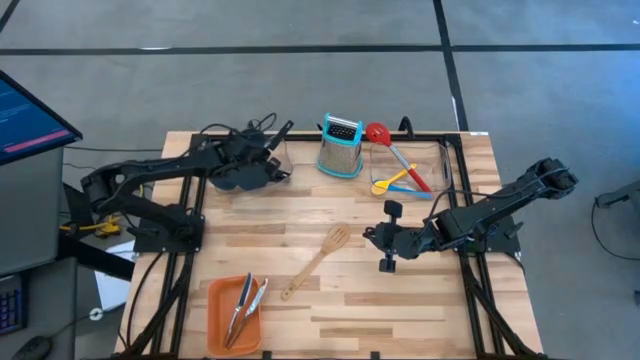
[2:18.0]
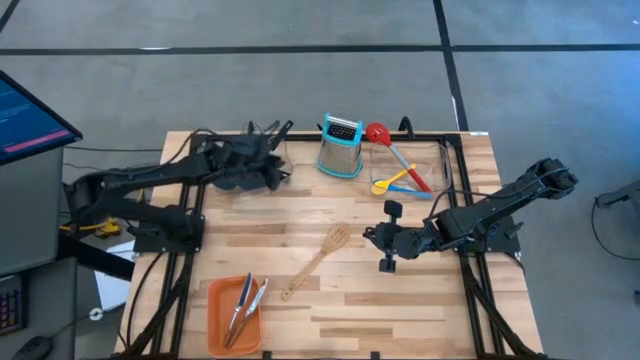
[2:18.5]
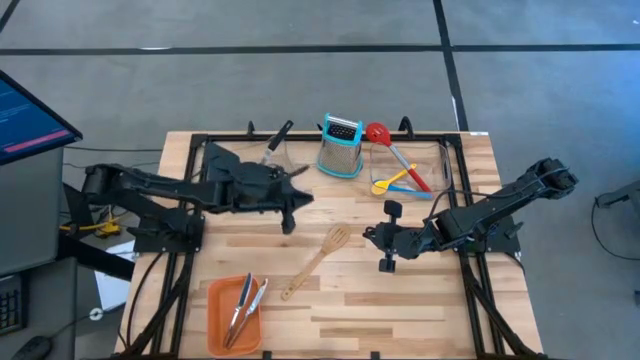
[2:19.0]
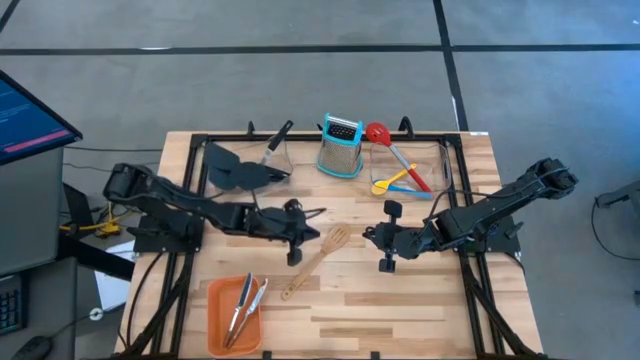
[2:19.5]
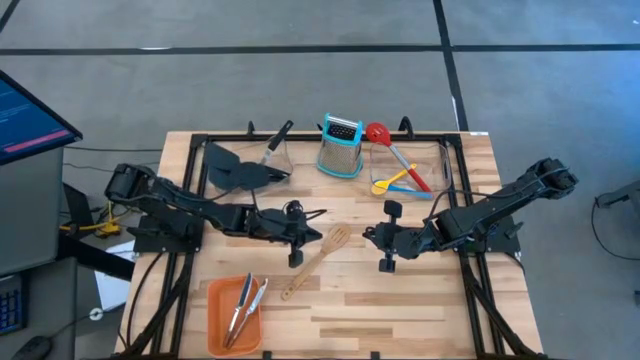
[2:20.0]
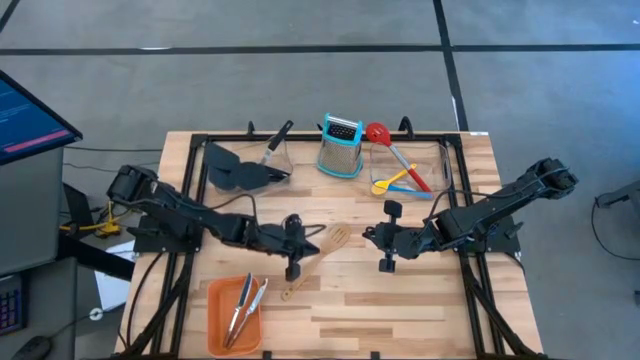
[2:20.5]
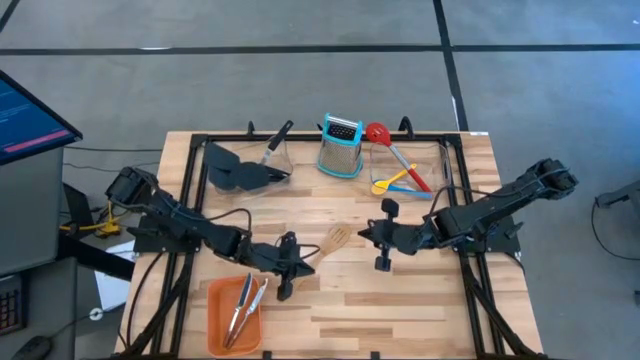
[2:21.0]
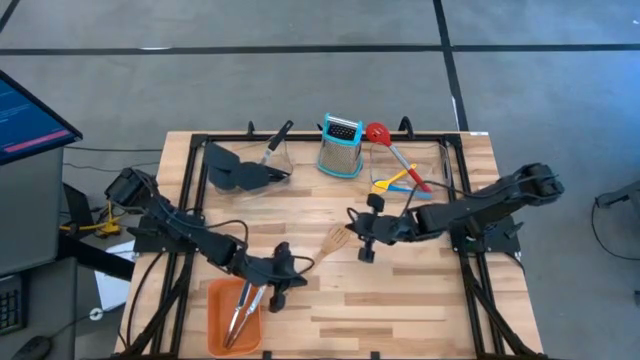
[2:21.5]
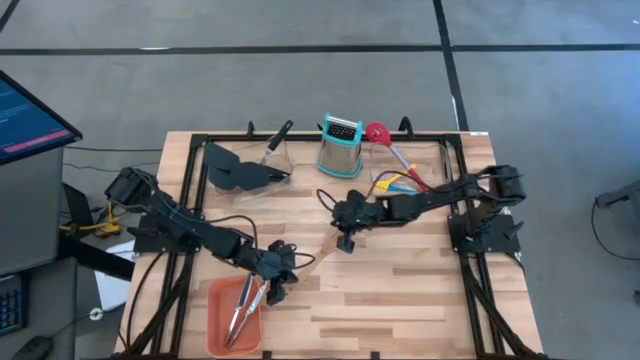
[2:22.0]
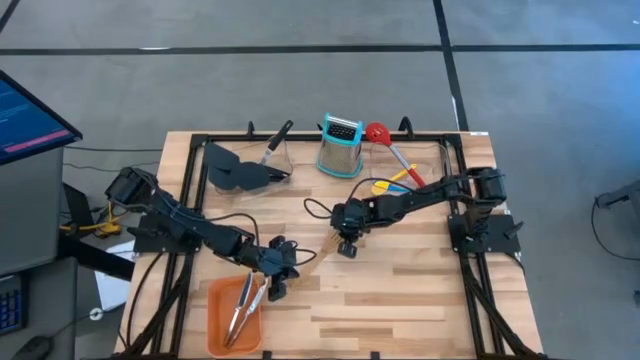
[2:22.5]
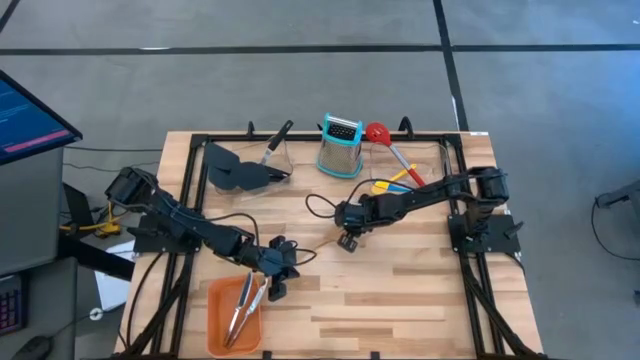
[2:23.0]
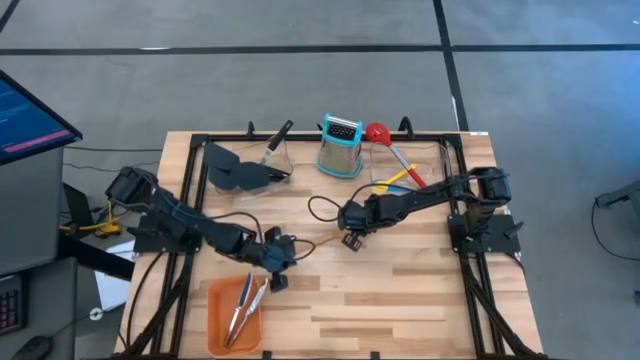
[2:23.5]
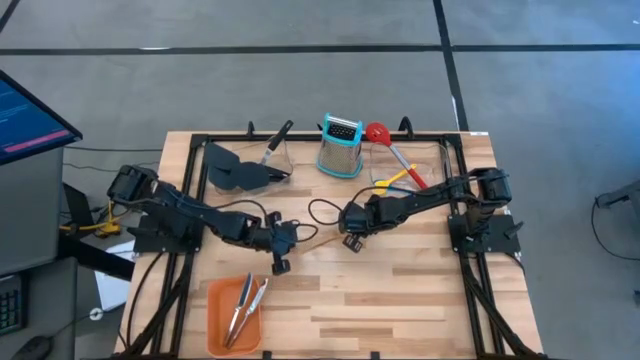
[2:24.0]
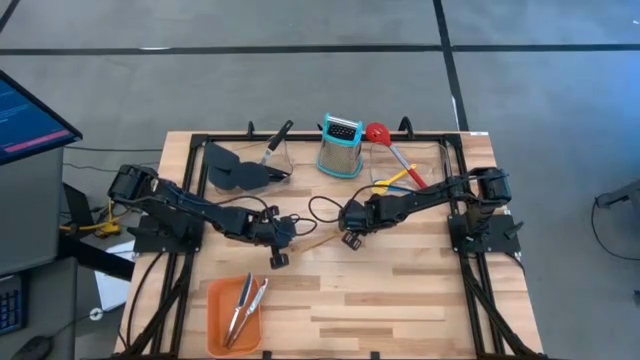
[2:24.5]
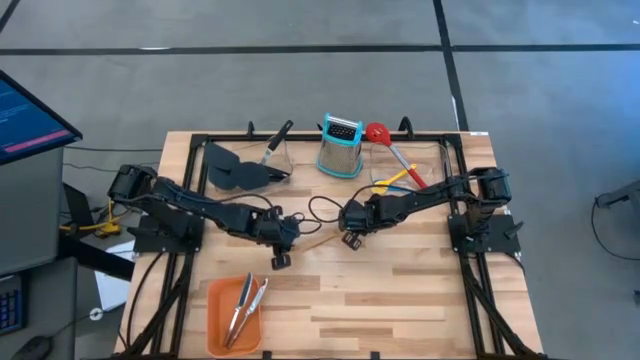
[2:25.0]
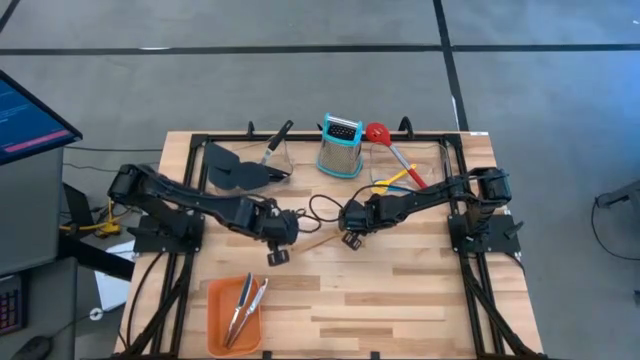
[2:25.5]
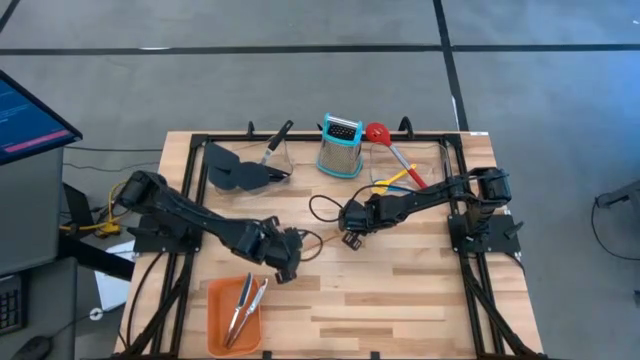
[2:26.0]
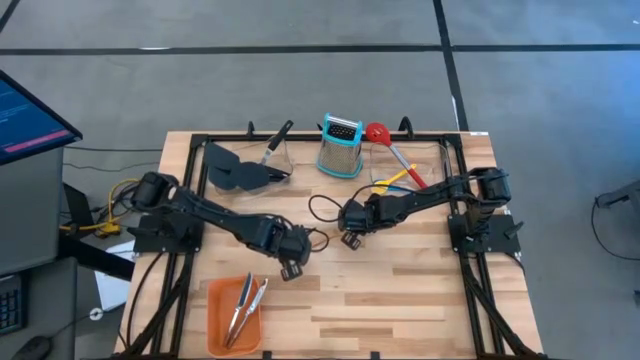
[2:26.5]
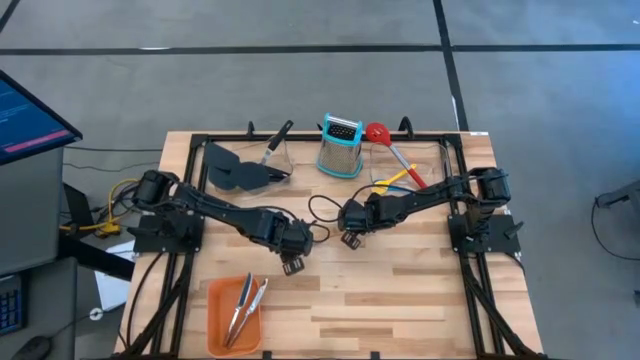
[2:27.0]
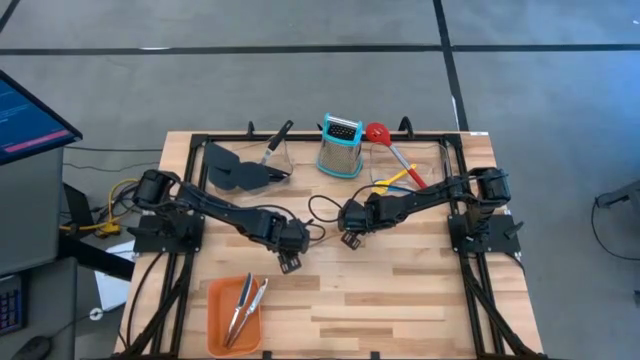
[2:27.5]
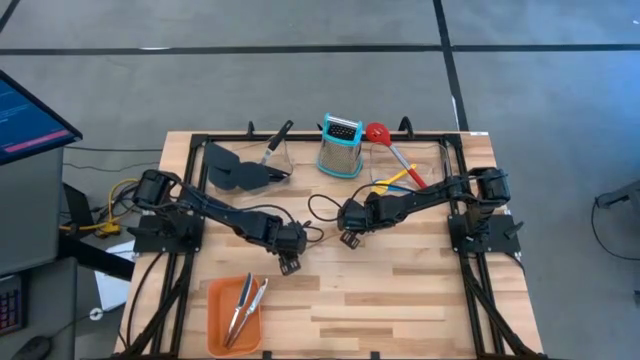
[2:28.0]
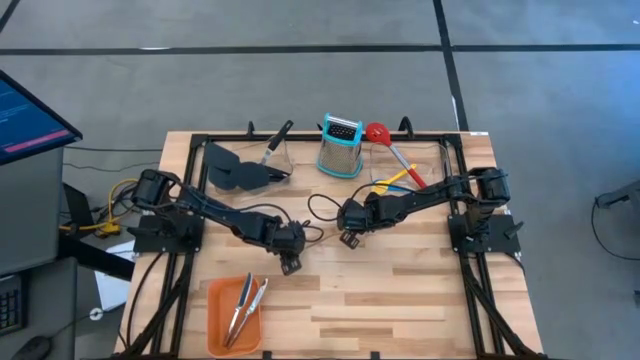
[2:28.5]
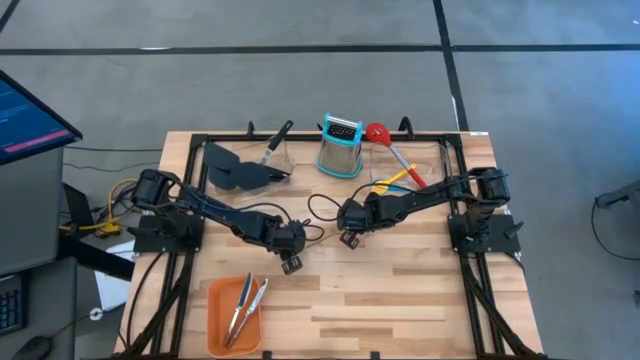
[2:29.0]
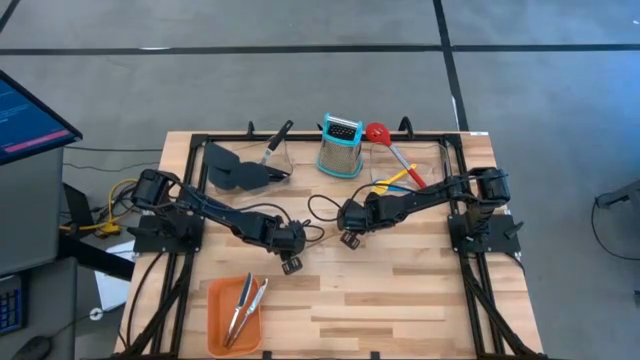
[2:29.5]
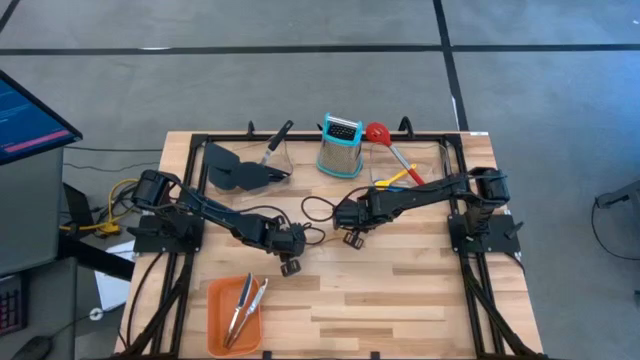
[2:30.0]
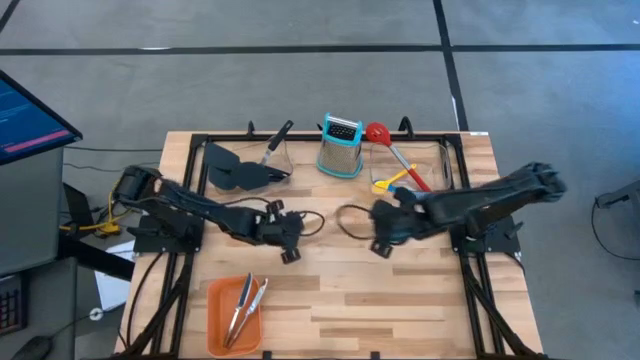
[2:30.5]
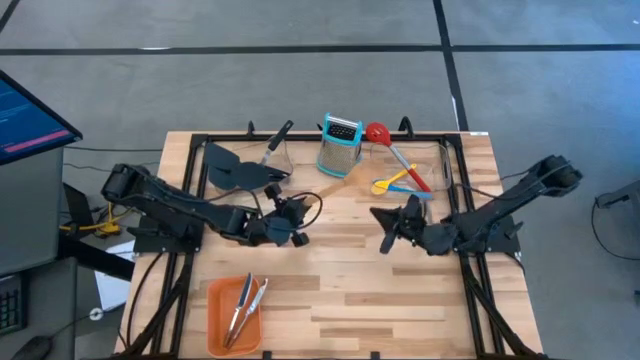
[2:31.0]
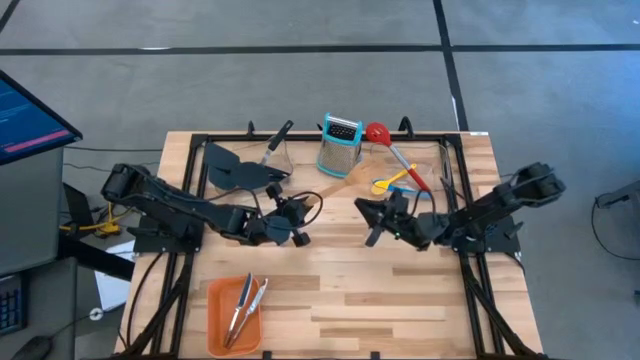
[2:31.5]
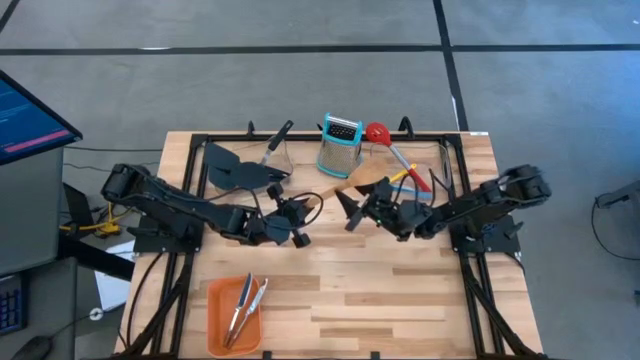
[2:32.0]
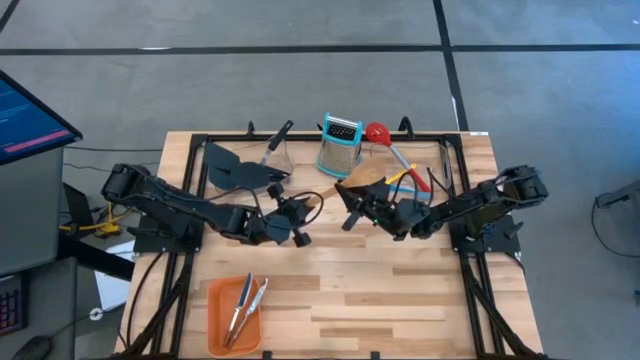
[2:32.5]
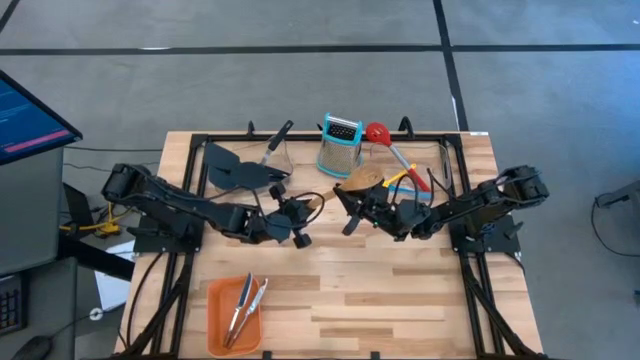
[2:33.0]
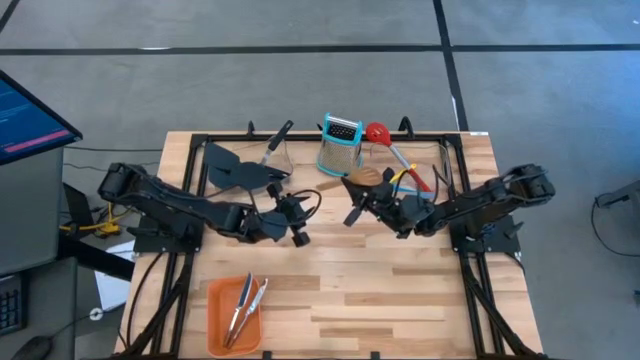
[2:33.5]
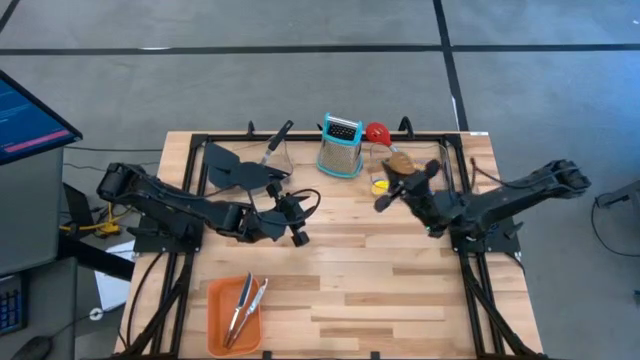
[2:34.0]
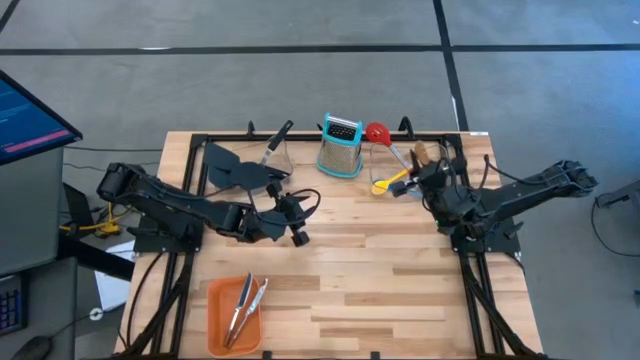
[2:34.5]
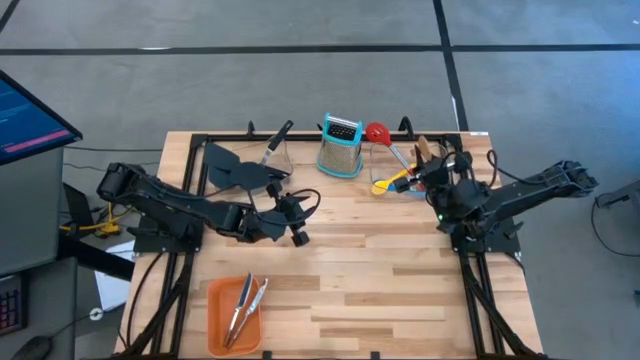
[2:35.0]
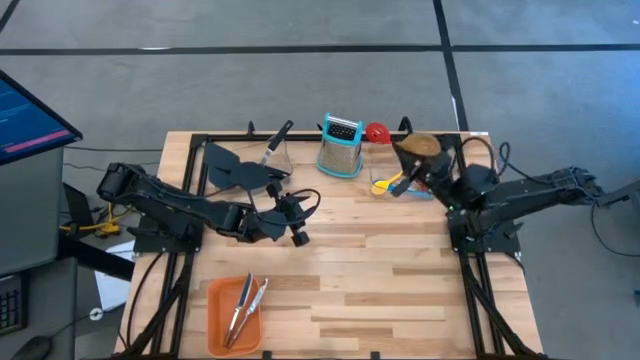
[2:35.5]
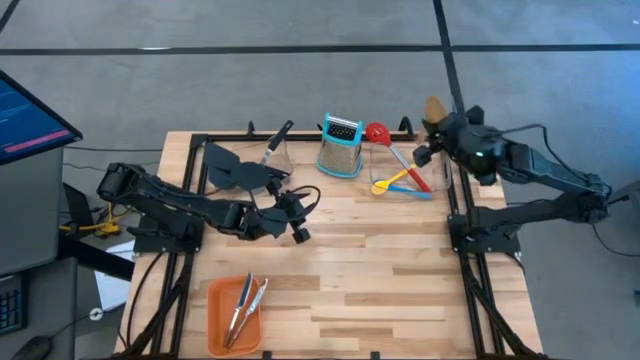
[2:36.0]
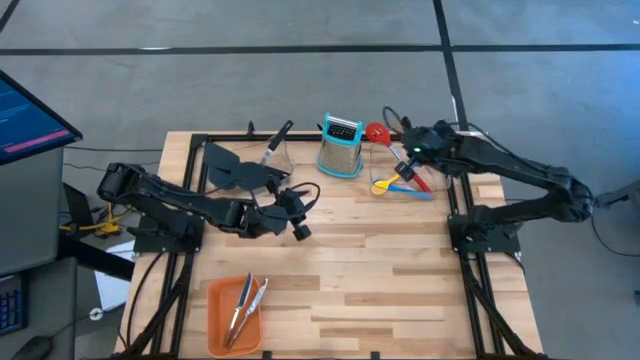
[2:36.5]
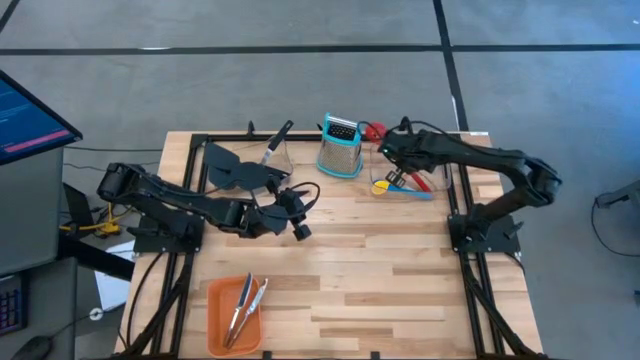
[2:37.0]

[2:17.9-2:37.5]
Task: Pick & Place Kitchen Items
Put the wooden slotted serving spoon into the right transparent bin
